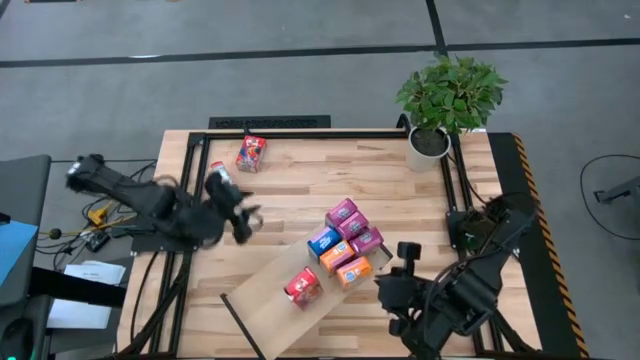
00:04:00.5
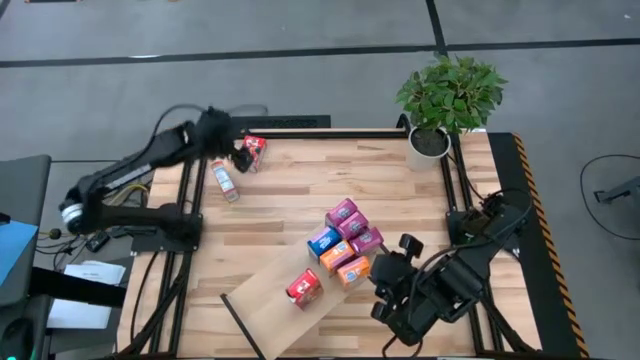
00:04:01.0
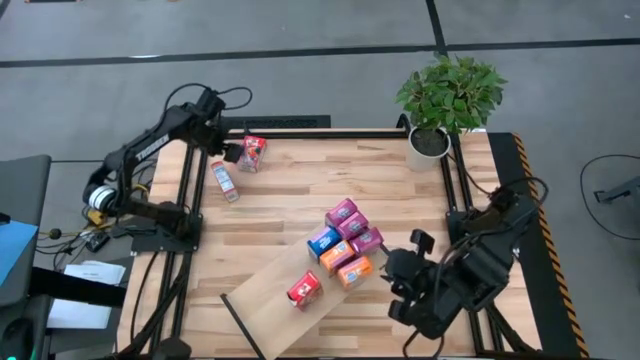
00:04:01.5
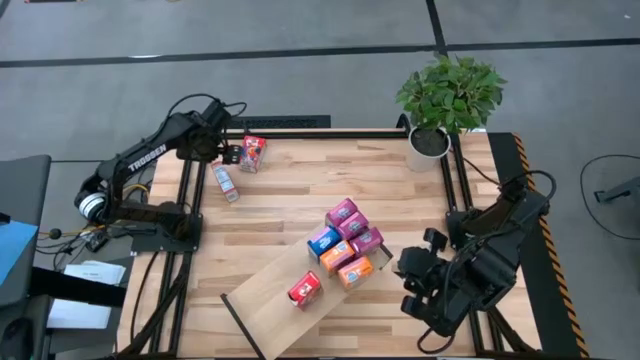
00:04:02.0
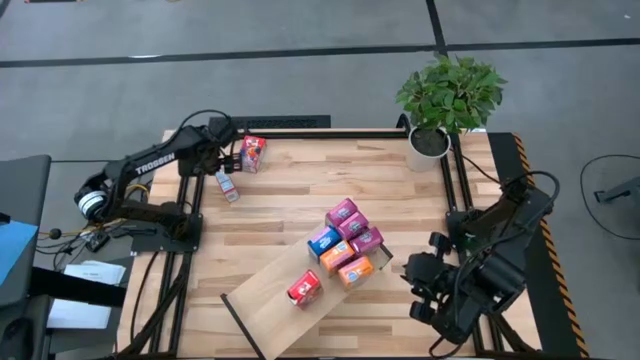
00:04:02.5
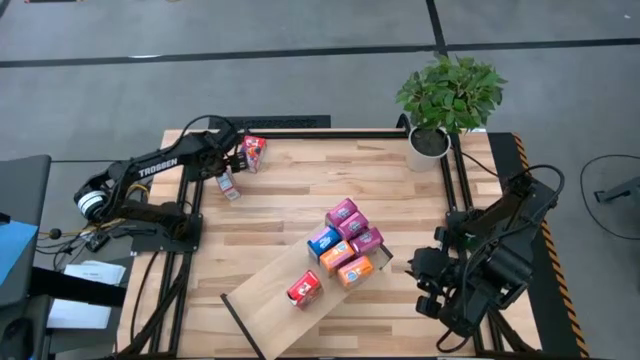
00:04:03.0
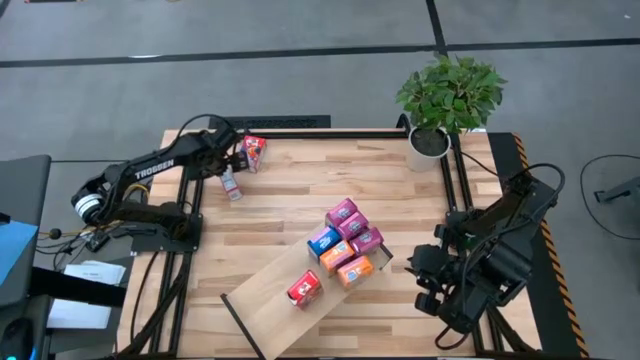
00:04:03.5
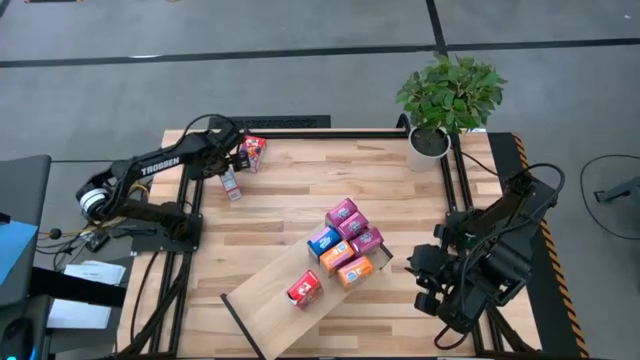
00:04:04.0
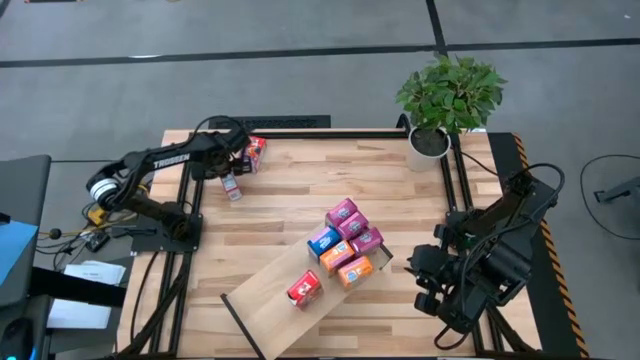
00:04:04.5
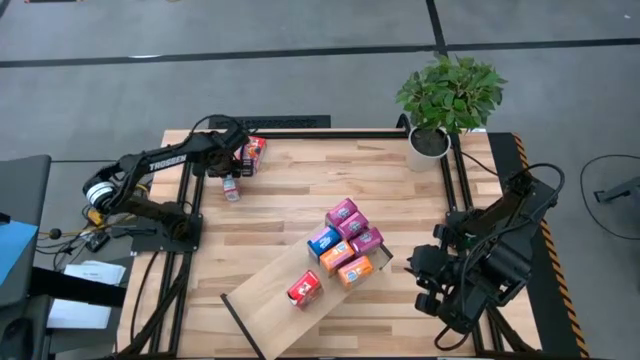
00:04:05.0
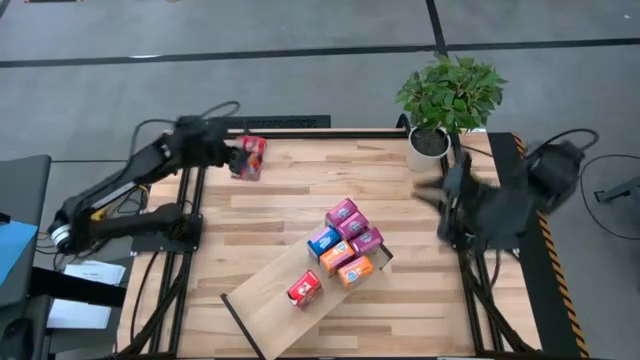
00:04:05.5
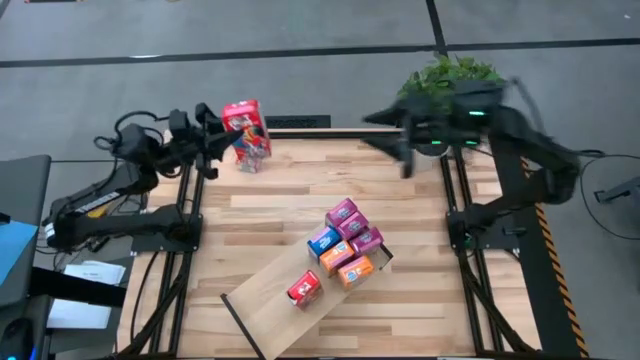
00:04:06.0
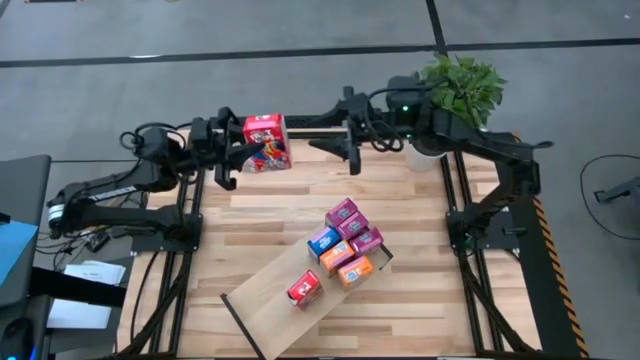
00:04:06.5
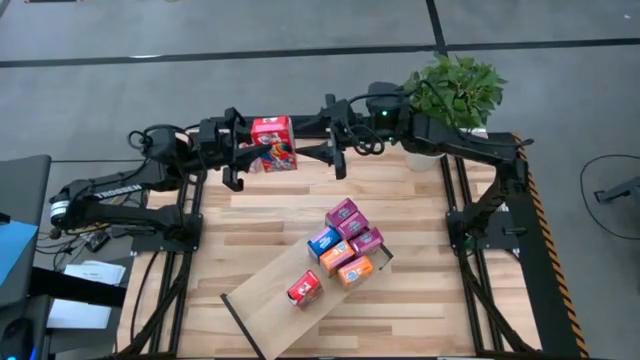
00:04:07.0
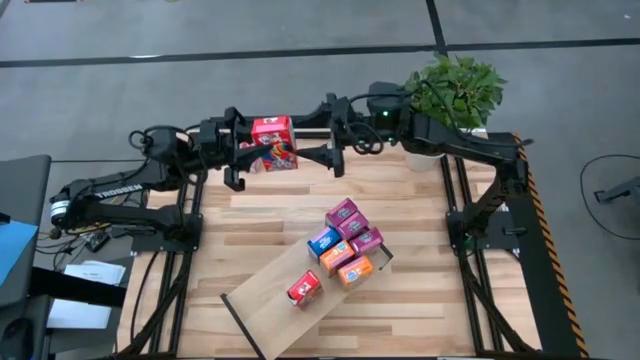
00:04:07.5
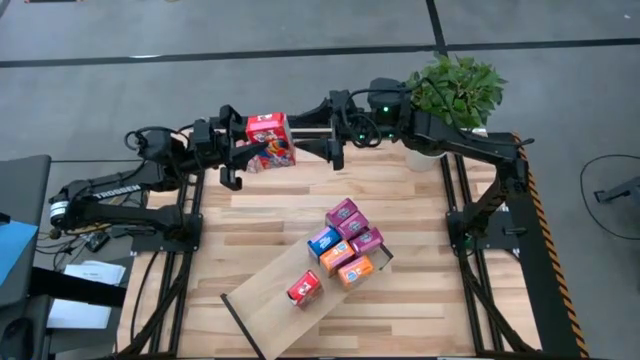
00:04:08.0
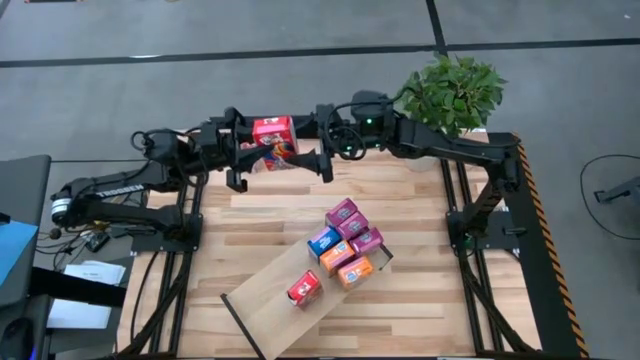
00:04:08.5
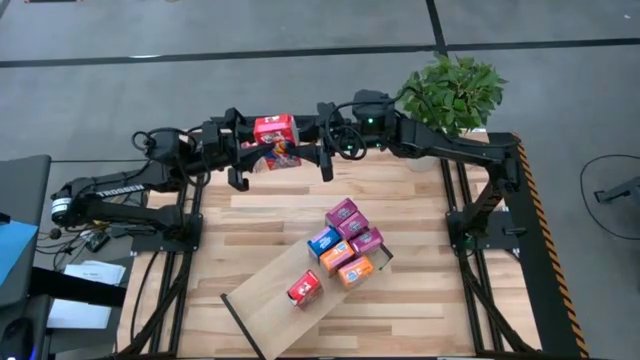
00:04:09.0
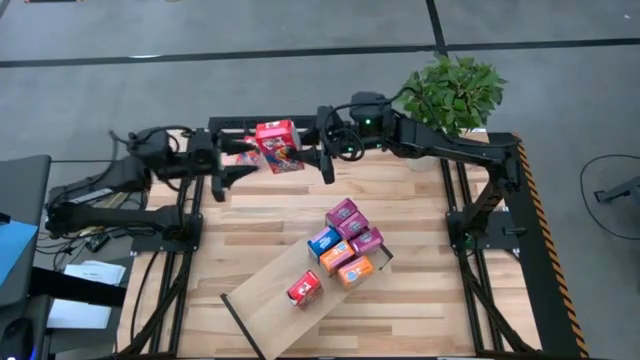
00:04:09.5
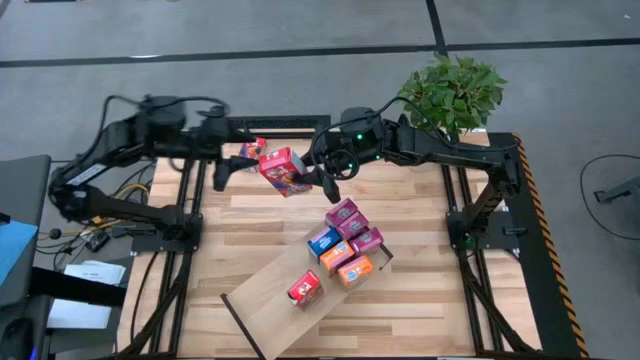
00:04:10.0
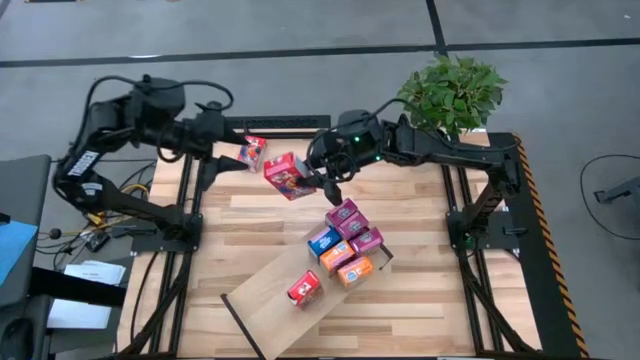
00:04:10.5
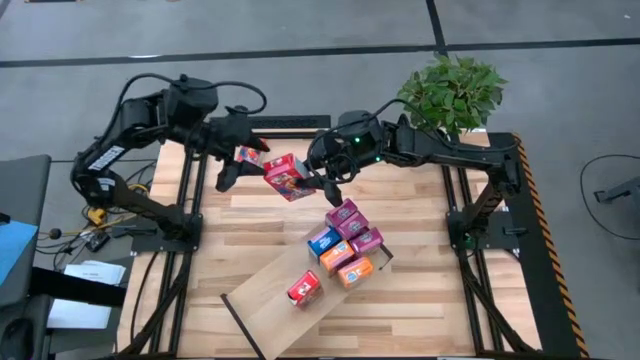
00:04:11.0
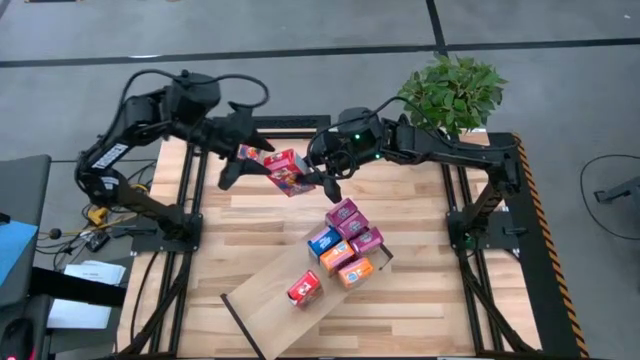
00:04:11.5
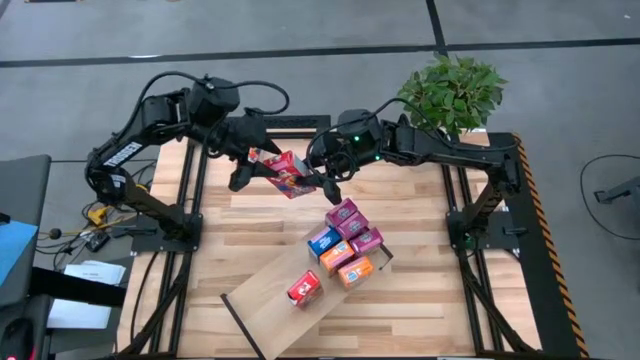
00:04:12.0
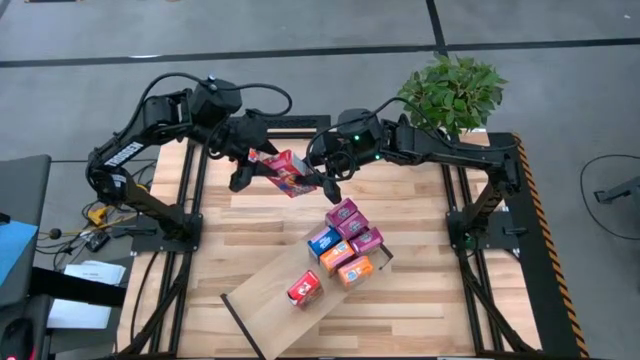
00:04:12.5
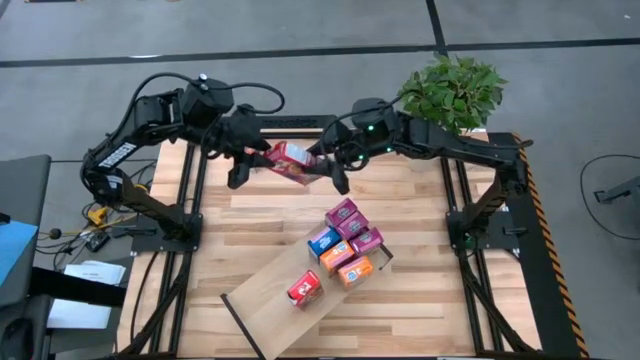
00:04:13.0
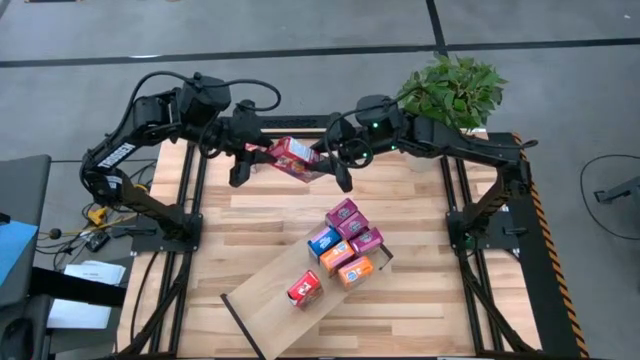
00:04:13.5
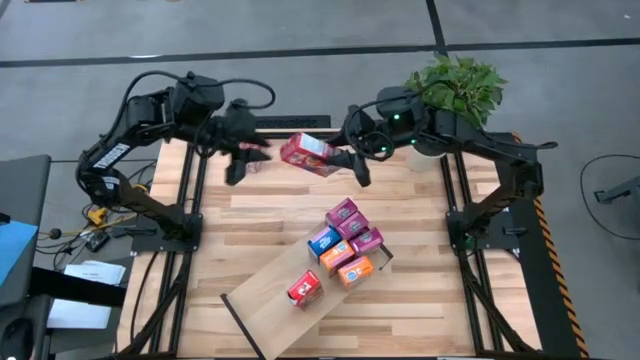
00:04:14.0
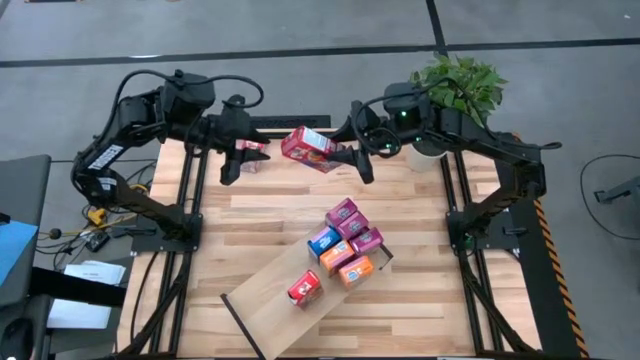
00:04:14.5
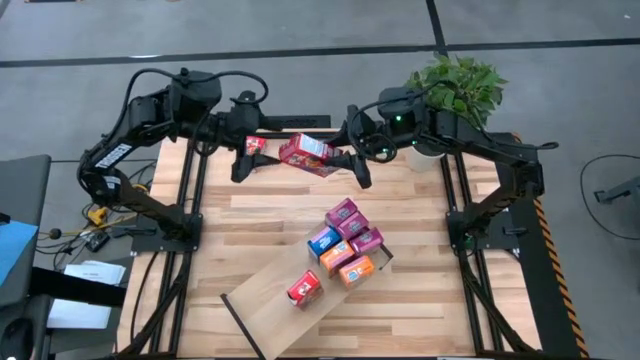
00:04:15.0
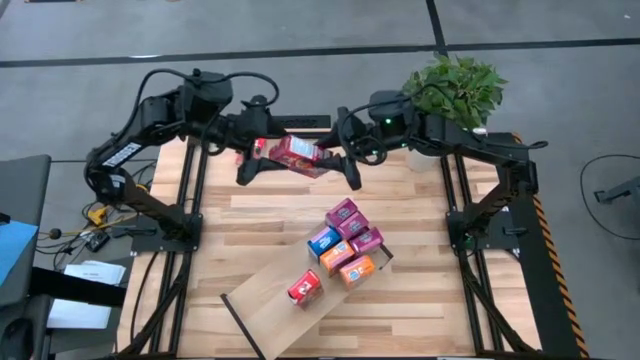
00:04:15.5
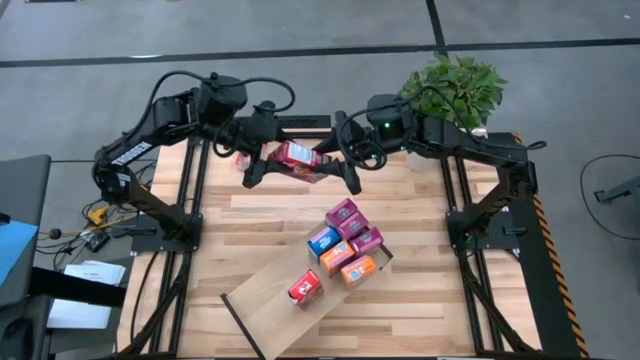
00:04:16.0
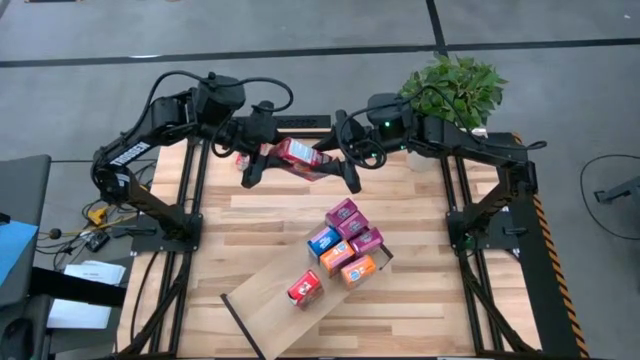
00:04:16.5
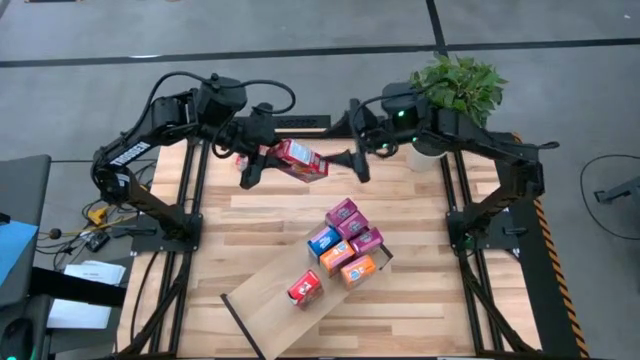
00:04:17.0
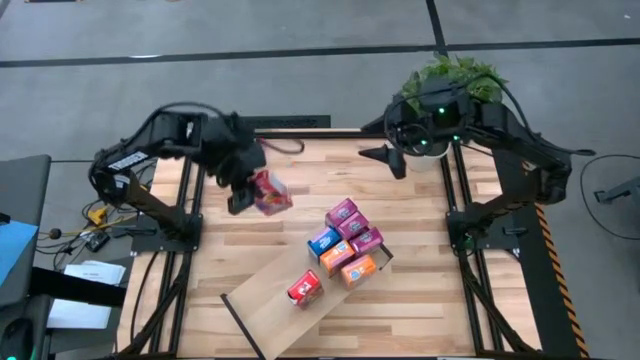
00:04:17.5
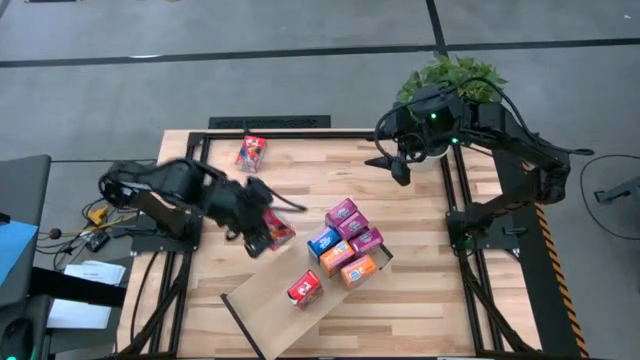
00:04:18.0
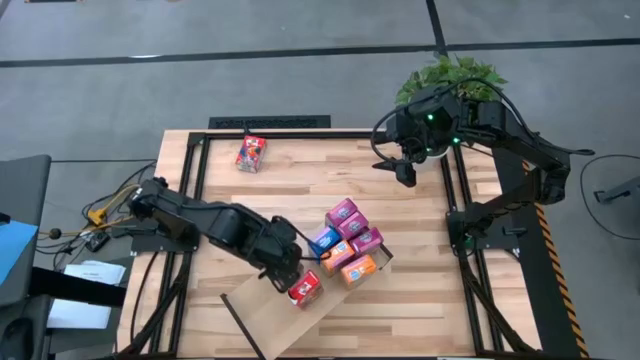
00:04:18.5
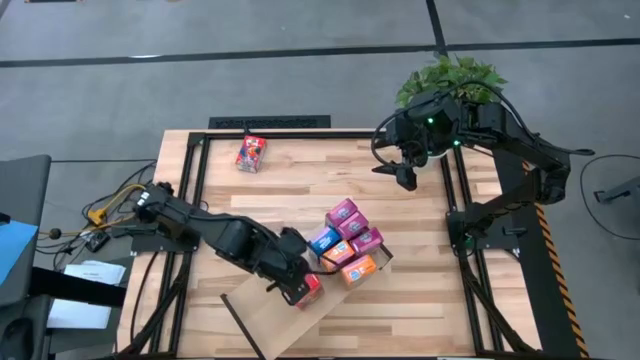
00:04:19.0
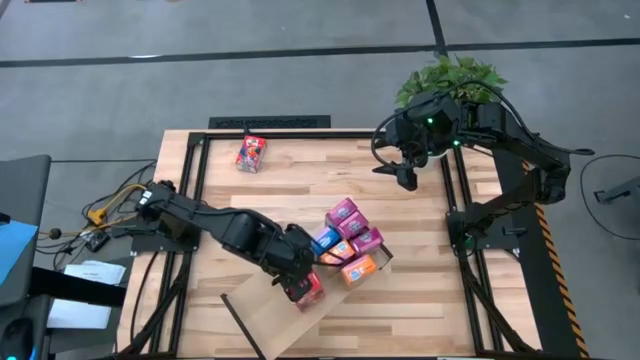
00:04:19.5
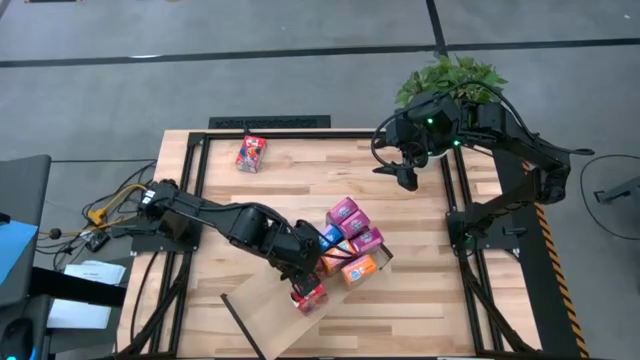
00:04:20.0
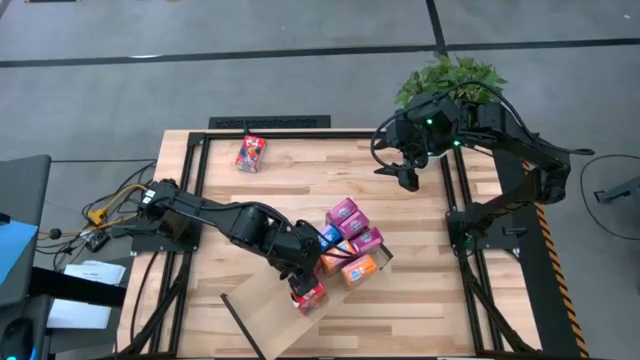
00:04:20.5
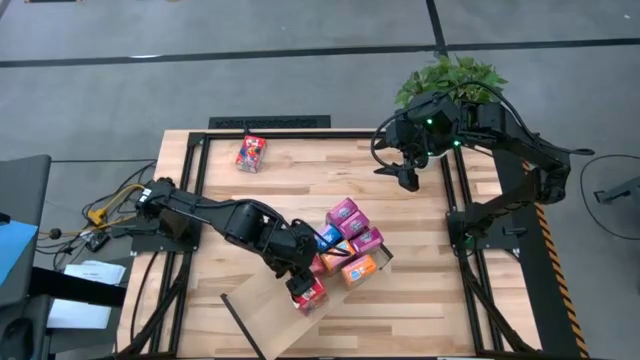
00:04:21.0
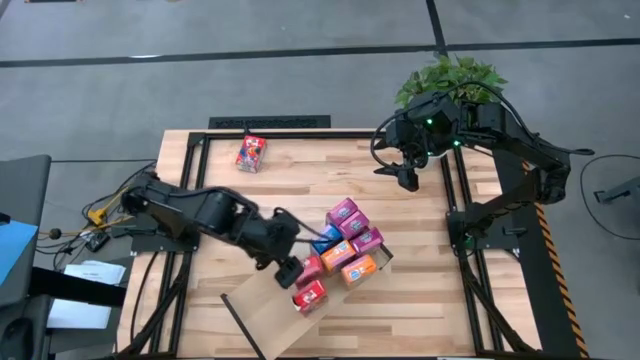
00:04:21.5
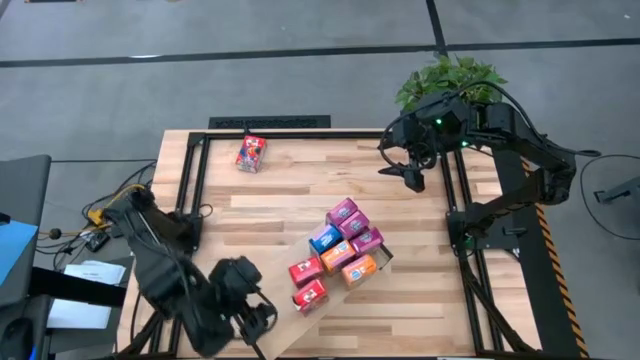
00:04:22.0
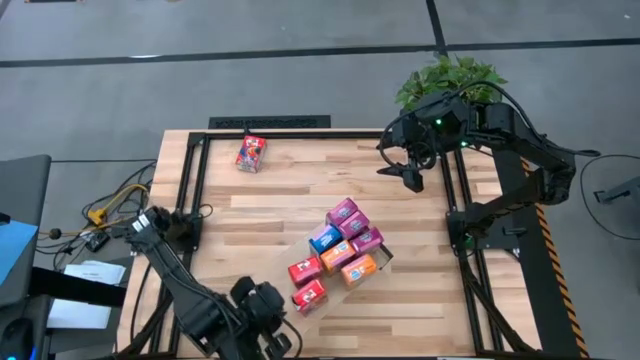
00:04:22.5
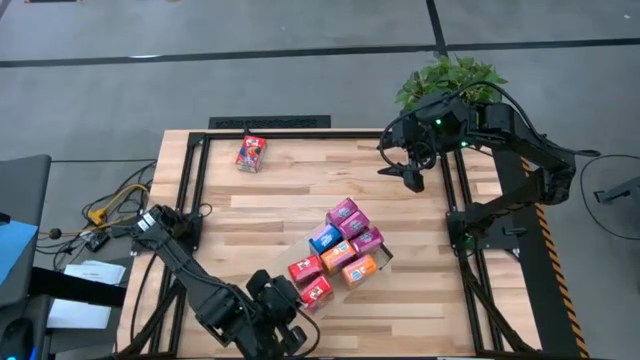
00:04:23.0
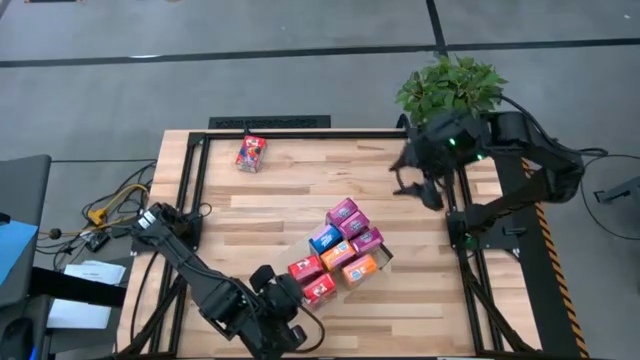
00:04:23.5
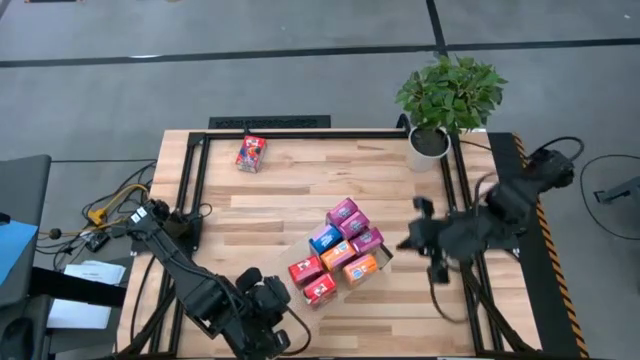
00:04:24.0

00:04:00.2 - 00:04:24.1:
Task: Stack cereal on shelf
Put the bottom red cereal box onto the shelf
